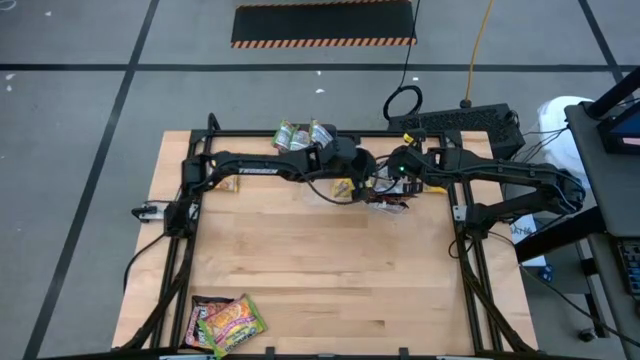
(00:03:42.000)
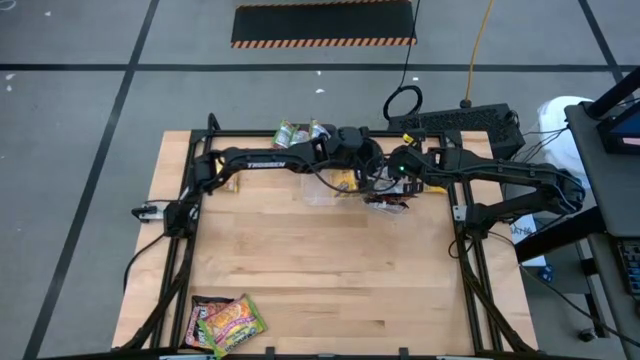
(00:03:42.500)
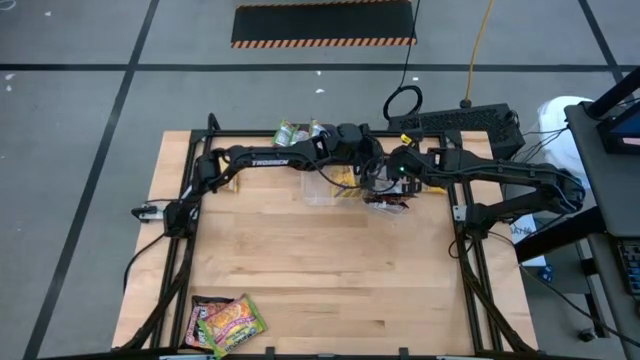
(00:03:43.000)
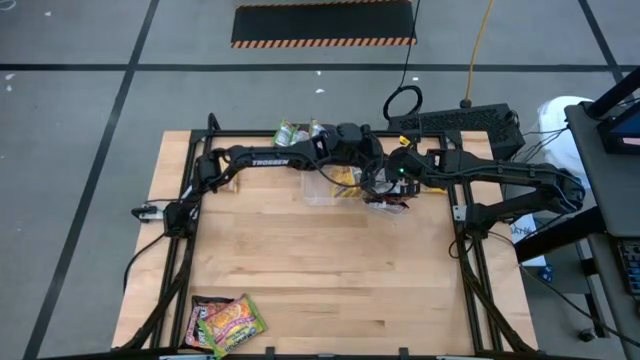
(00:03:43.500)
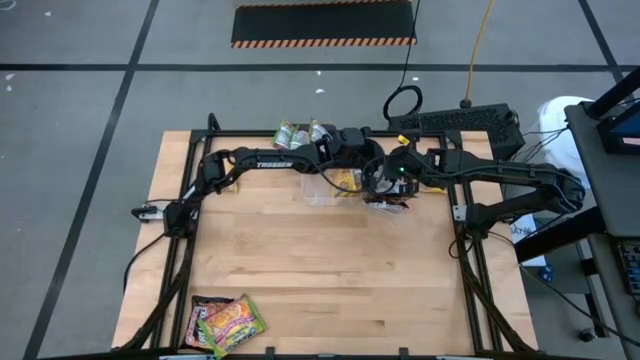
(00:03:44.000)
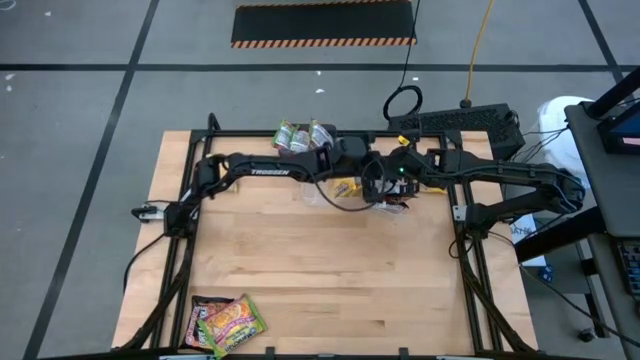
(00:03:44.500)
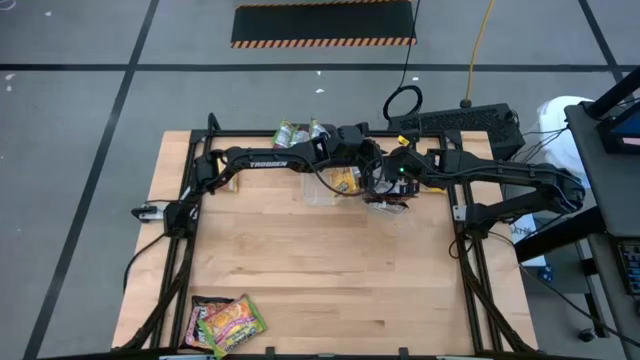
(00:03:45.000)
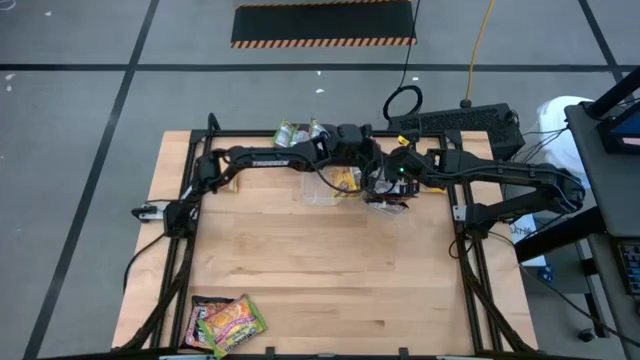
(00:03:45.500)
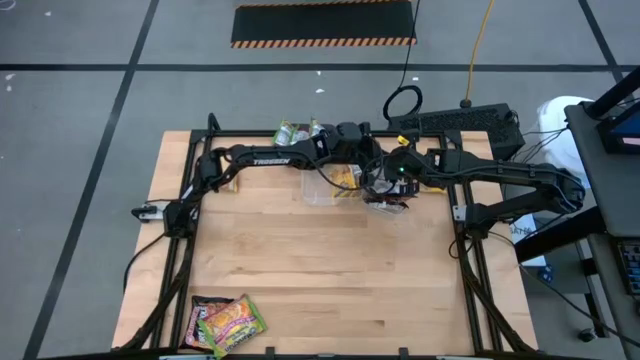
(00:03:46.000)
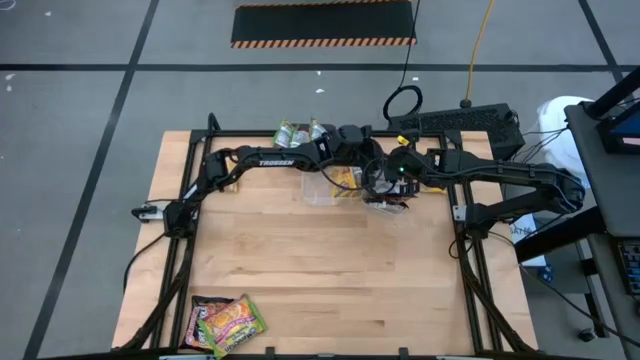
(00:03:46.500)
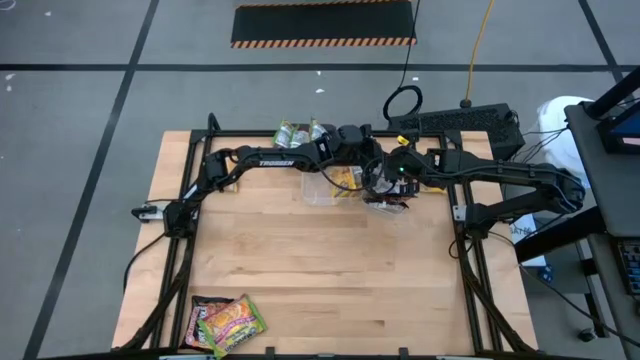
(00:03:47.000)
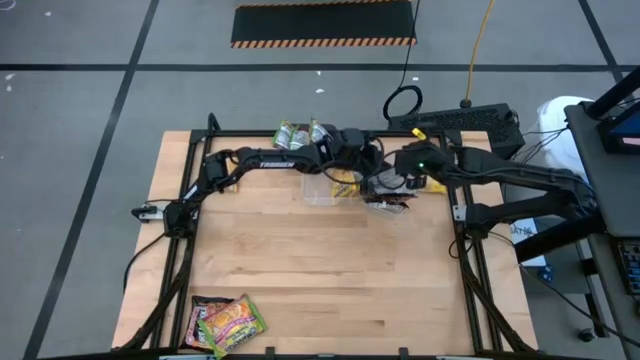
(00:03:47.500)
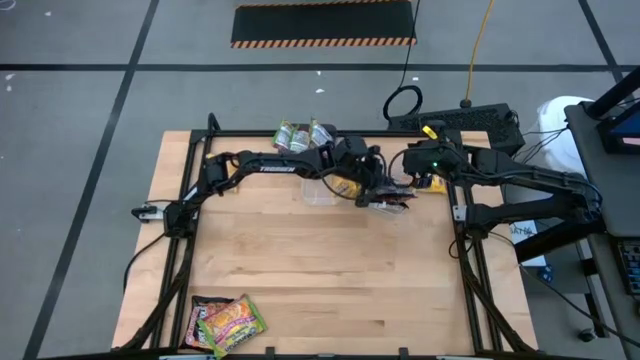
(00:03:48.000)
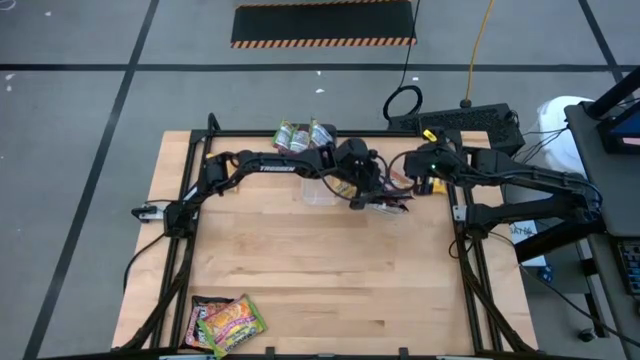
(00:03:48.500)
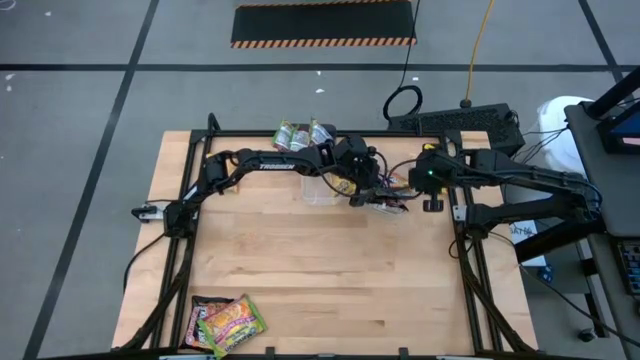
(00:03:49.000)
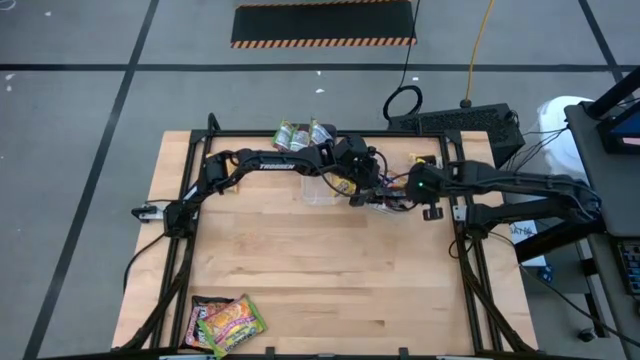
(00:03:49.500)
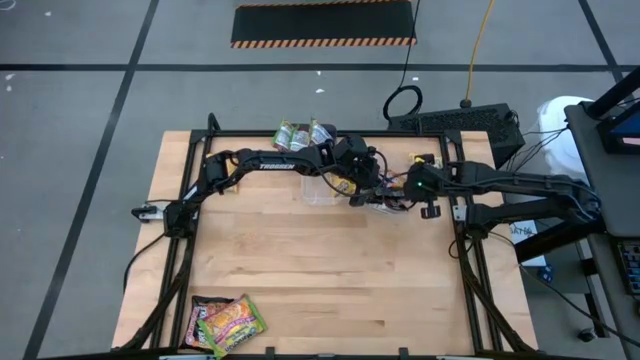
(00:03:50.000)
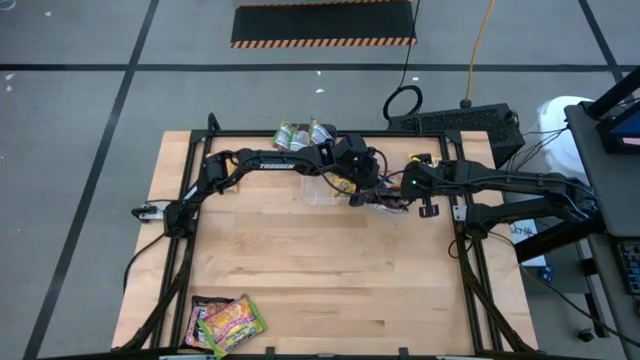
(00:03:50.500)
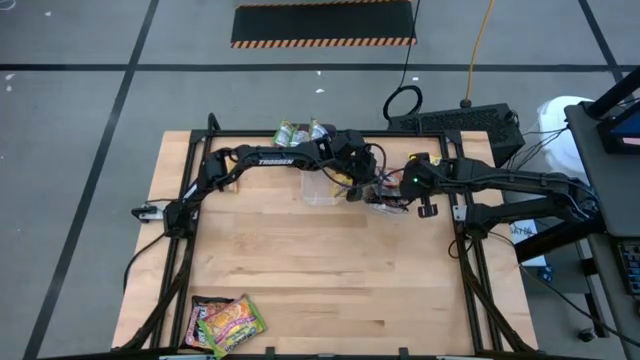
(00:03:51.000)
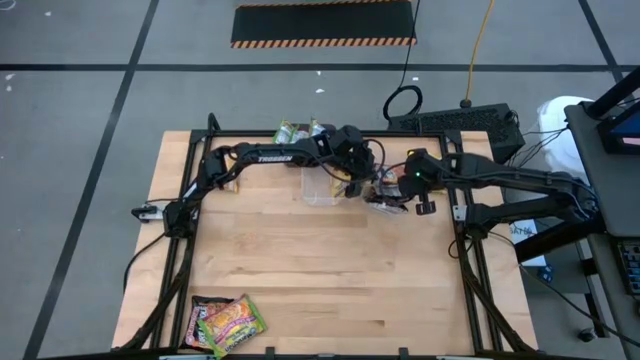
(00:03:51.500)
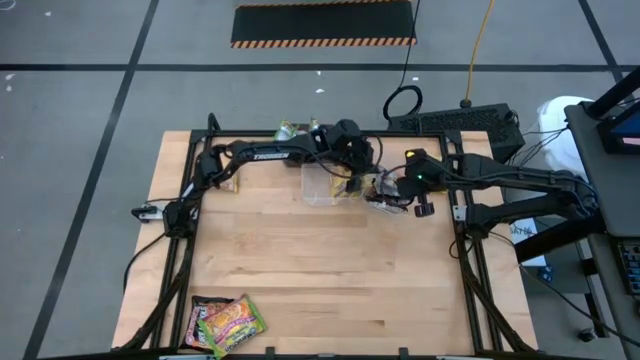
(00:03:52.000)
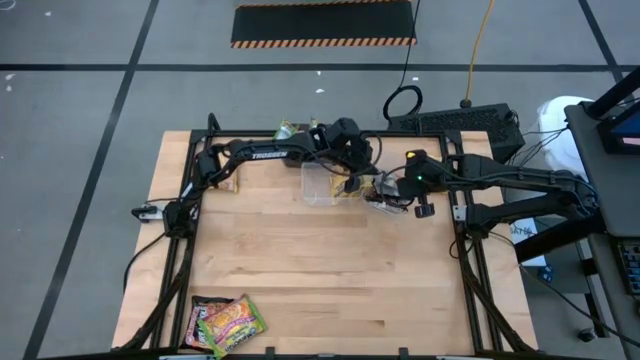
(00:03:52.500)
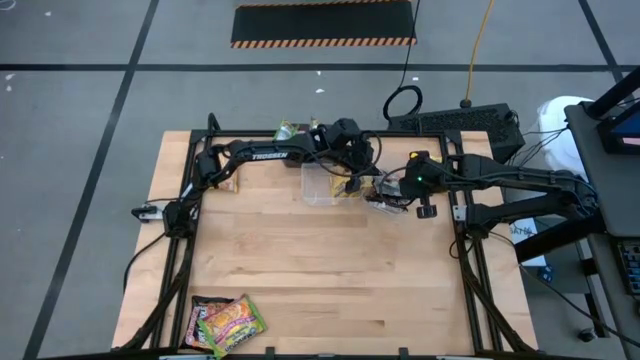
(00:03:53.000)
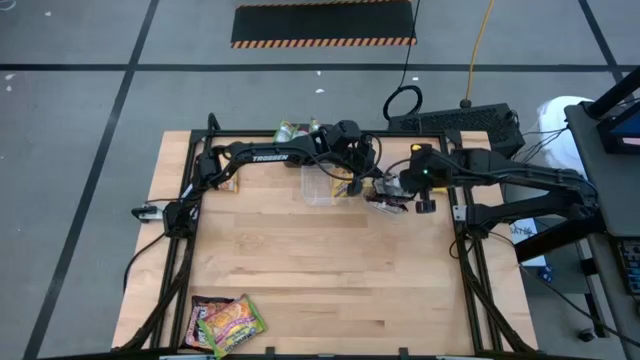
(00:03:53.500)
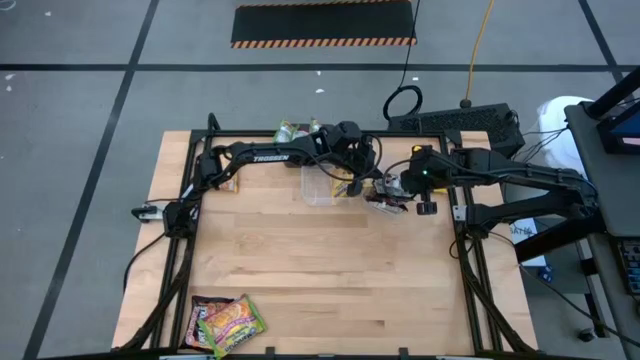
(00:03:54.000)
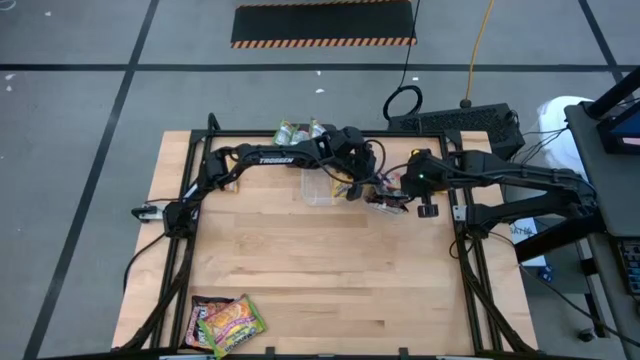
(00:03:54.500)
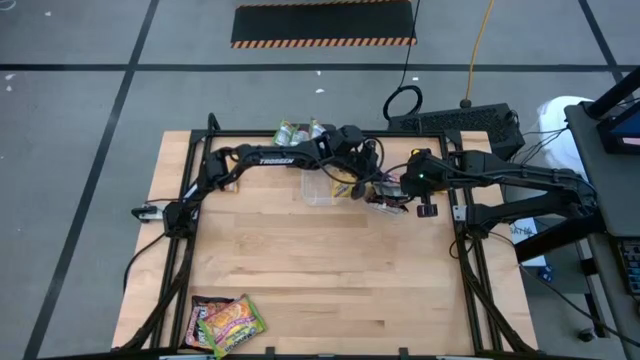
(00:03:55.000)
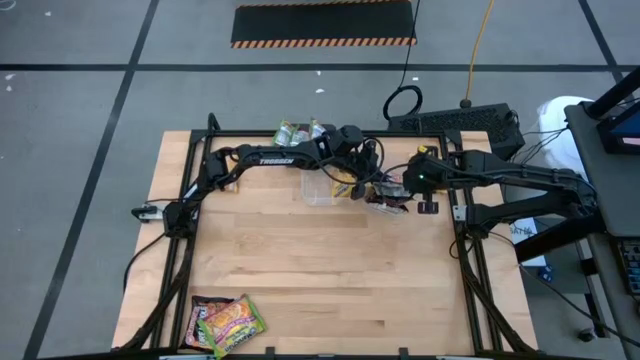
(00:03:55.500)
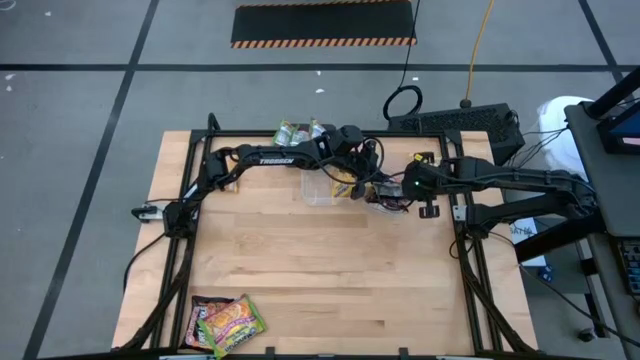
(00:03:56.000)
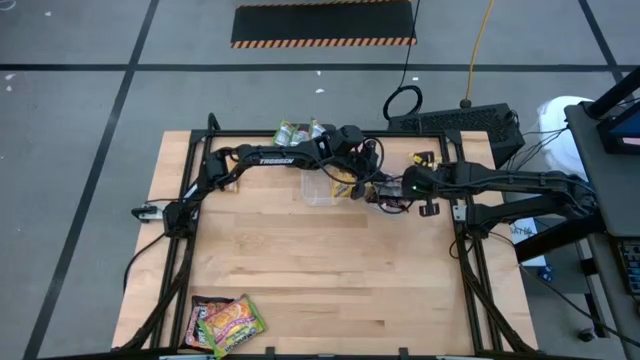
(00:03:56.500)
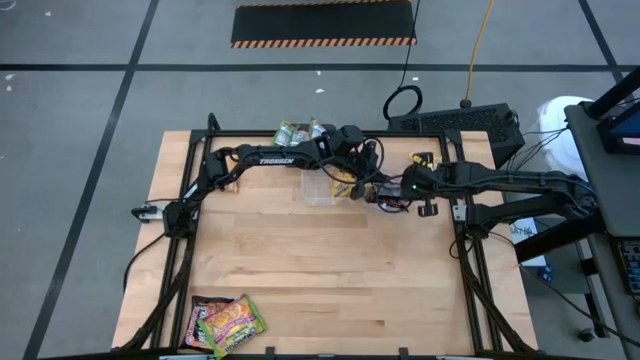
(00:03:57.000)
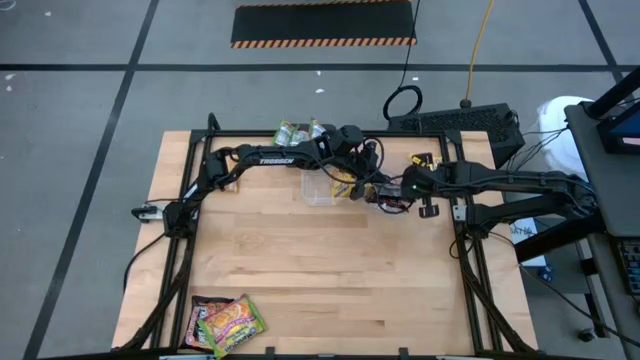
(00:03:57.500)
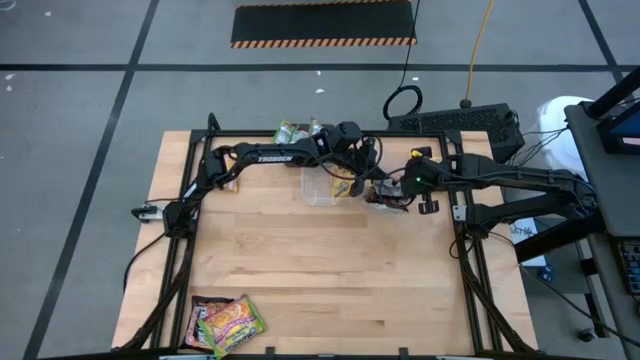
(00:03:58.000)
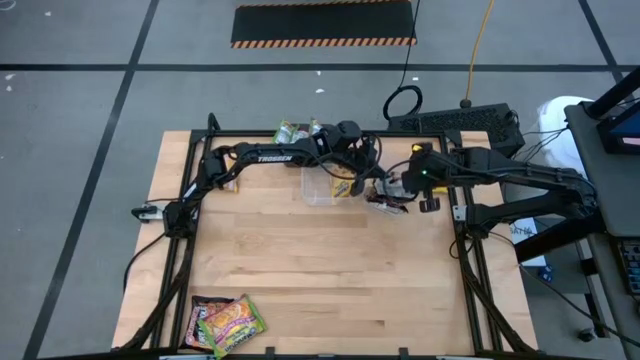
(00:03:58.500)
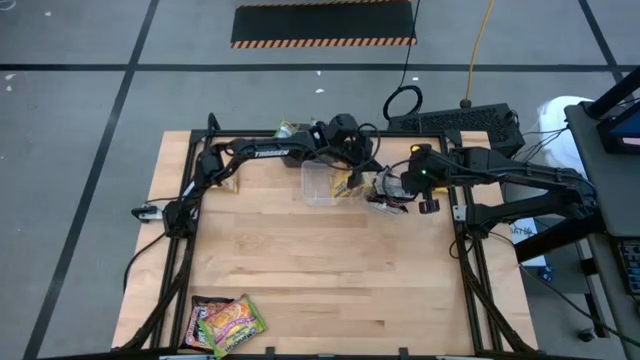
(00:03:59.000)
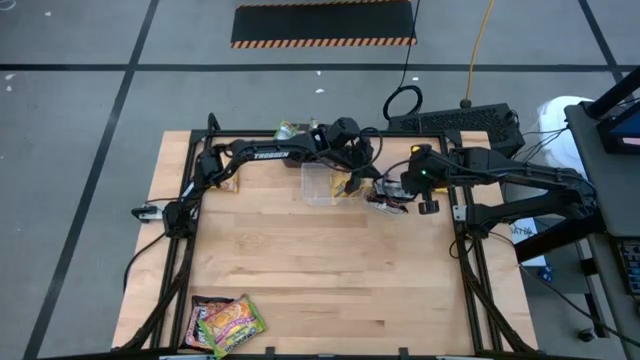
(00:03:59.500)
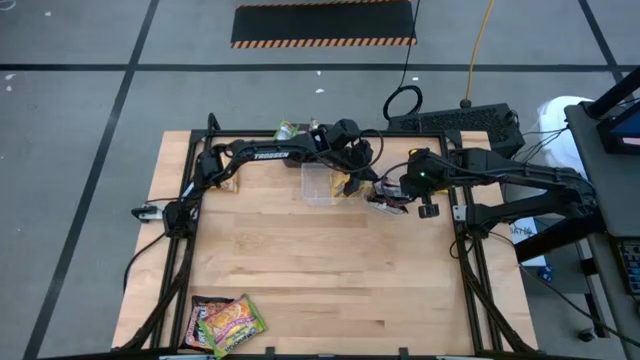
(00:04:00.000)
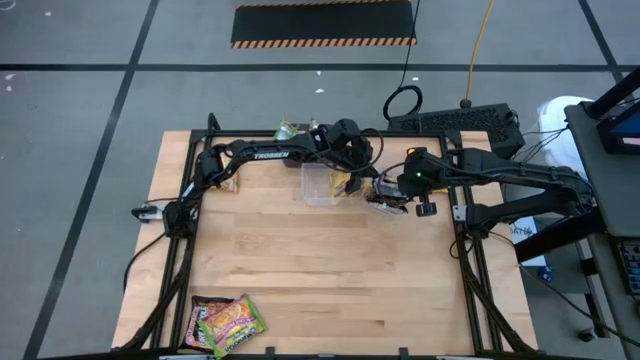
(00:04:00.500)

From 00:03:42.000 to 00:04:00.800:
Task: Sort Maruchan noodles
Put the black noodle pack into the right transparent bin

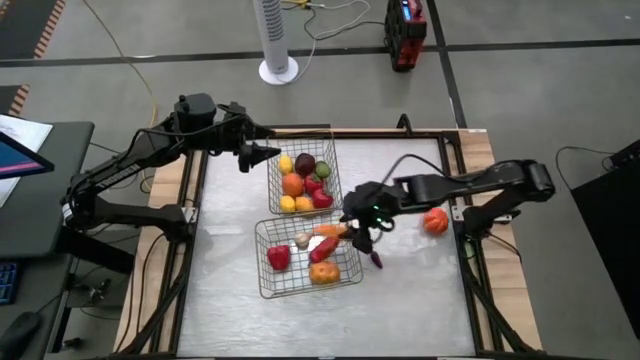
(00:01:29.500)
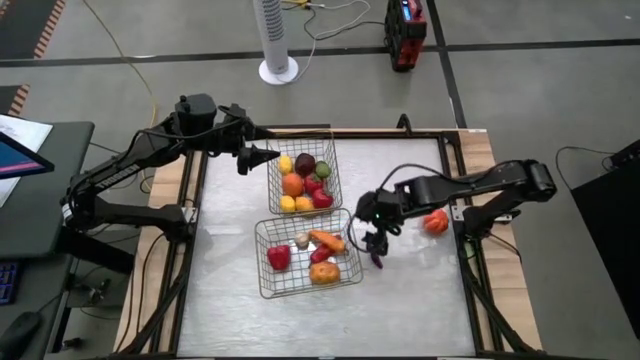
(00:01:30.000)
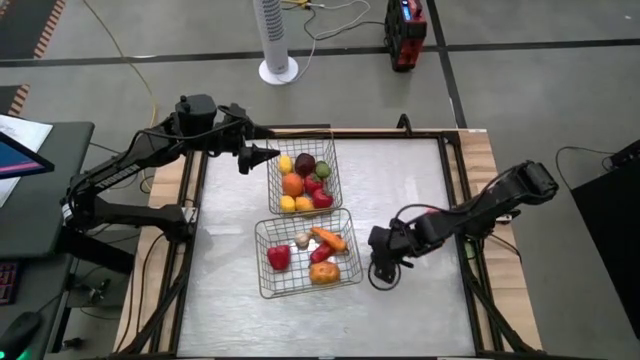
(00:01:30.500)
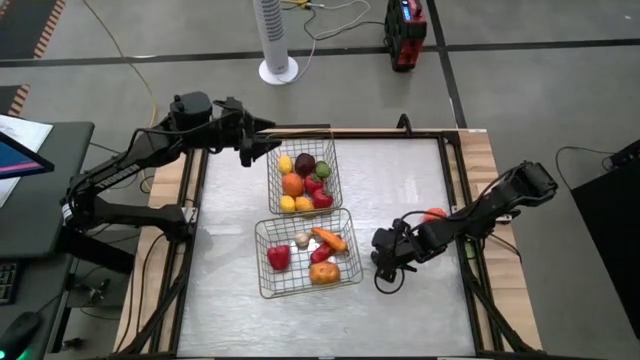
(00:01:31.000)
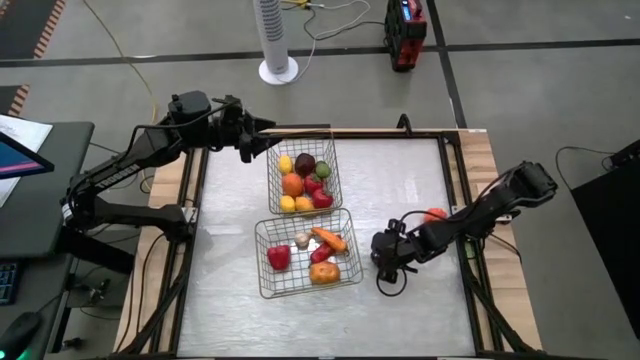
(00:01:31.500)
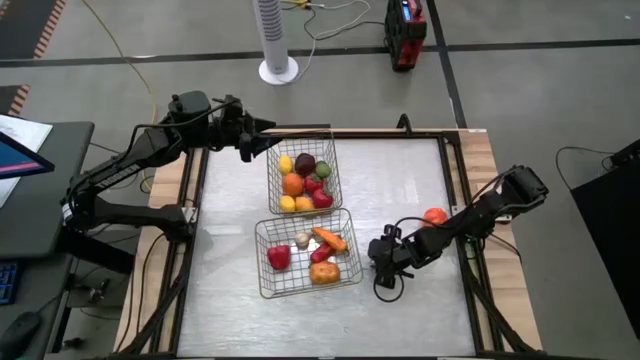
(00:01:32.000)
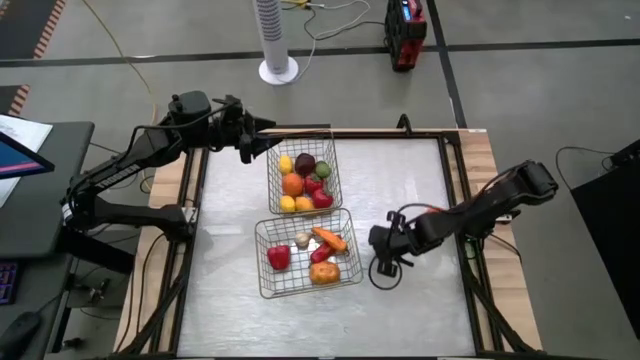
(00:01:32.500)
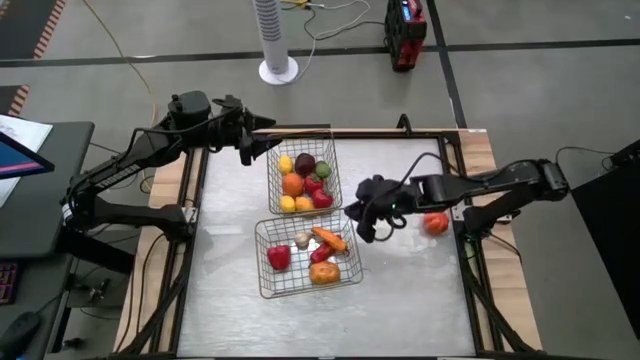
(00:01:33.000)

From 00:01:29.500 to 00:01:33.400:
Task: Sort produce into baskets
Put the violet eggplant into the bottom wire basket
